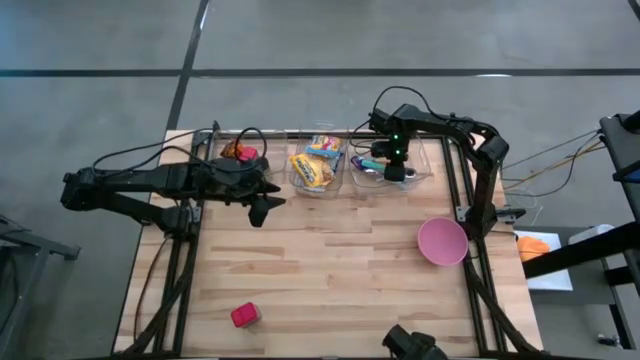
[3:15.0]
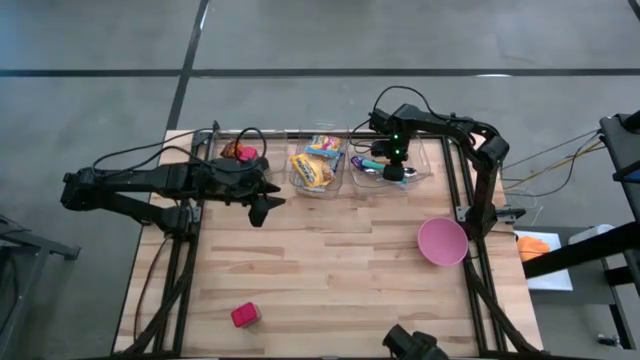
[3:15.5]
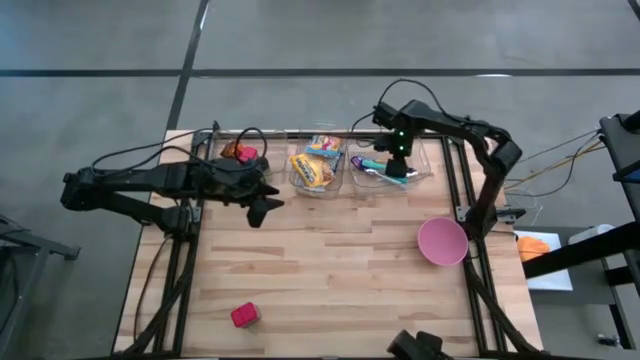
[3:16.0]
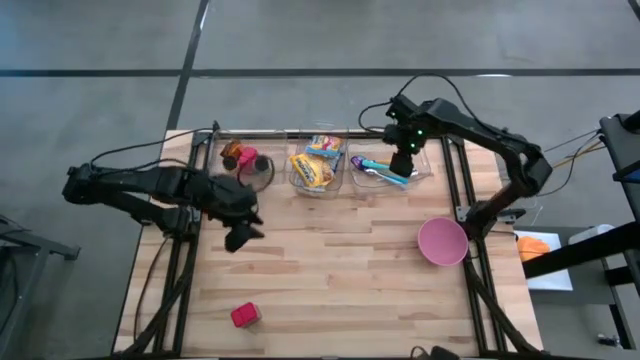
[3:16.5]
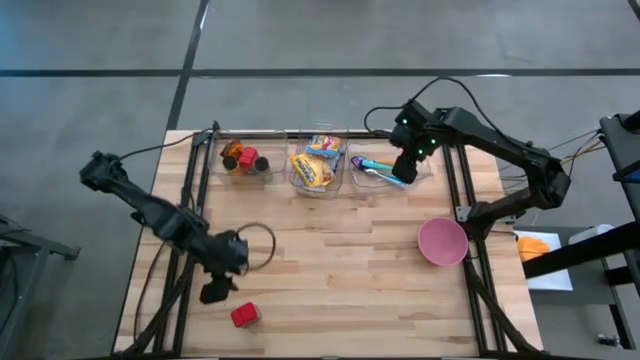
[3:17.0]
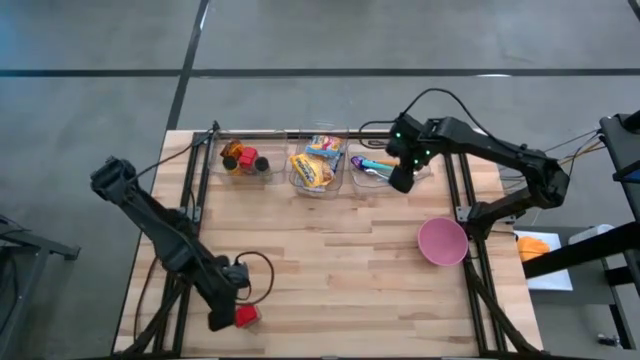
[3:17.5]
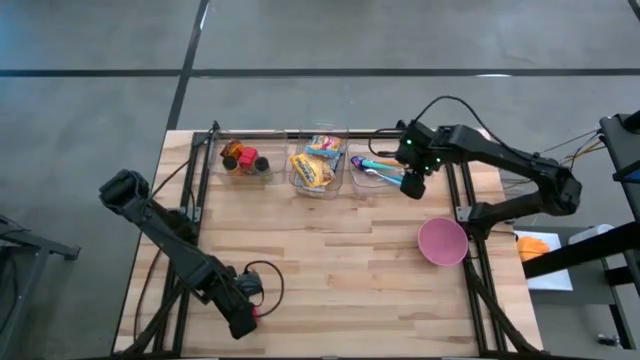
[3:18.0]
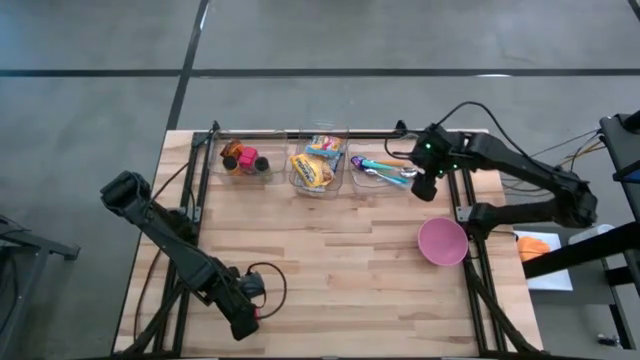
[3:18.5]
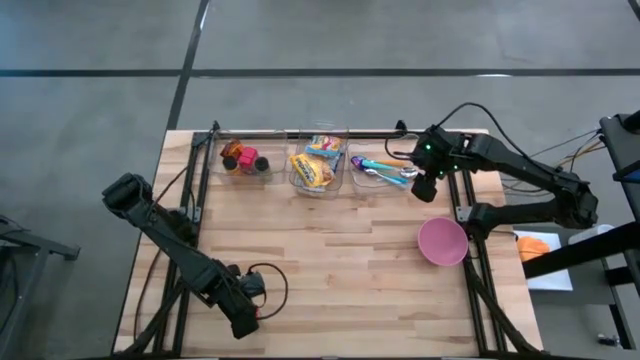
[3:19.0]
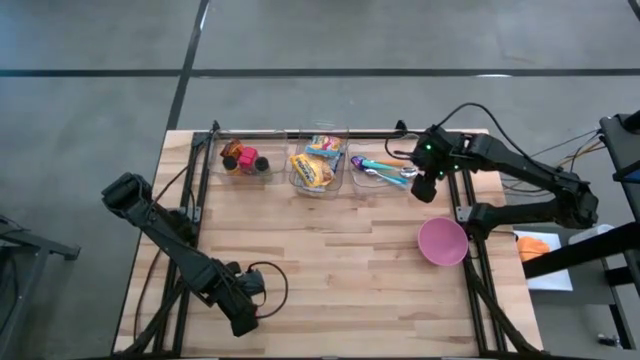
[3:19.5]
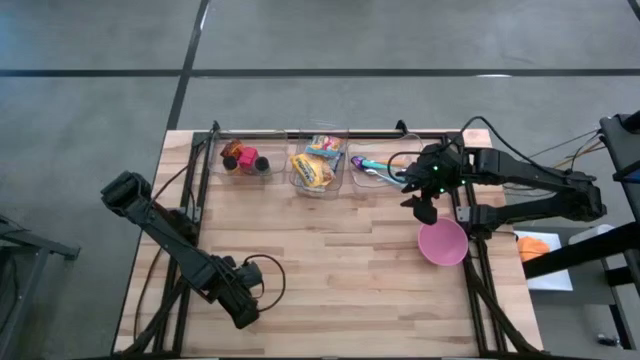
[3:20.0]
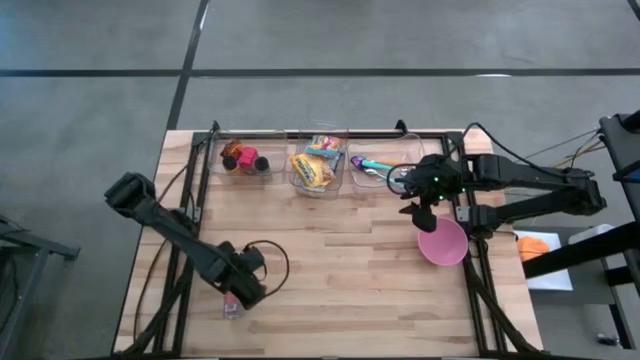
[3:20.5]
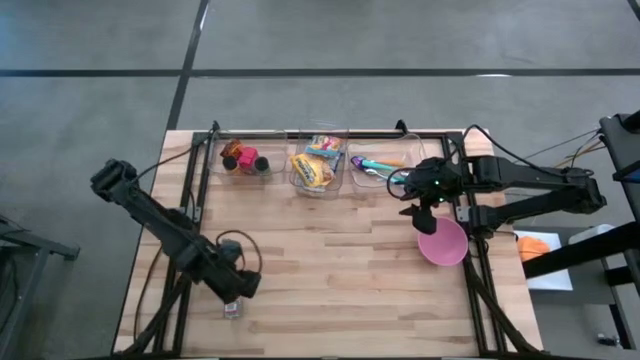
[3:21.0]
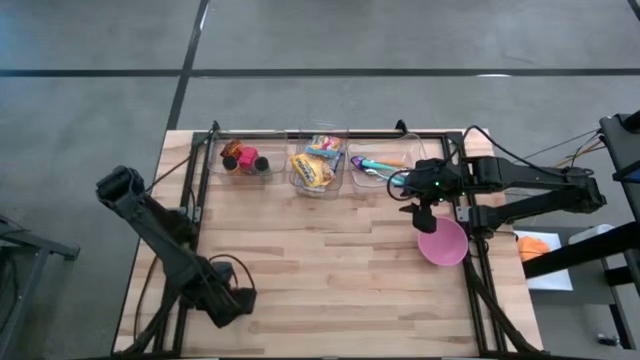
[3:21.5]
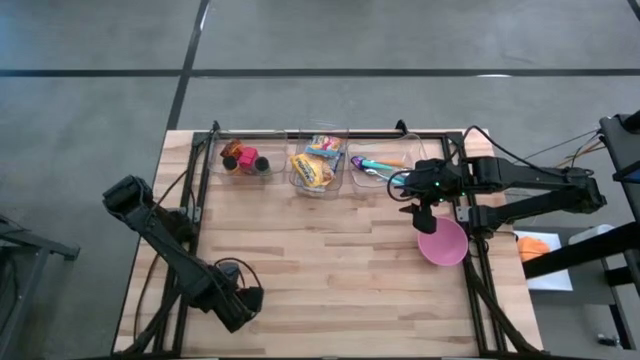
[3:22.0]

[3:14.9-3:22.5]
Put the red seasoning can into the left transparent bin

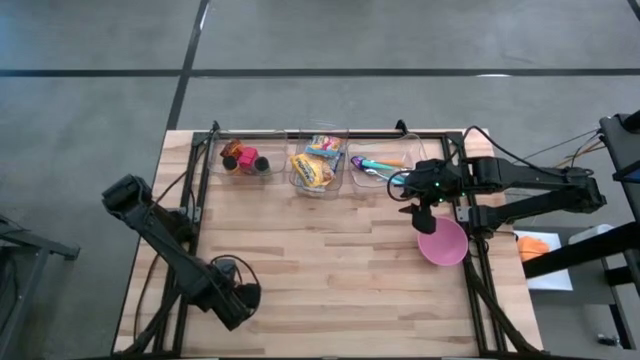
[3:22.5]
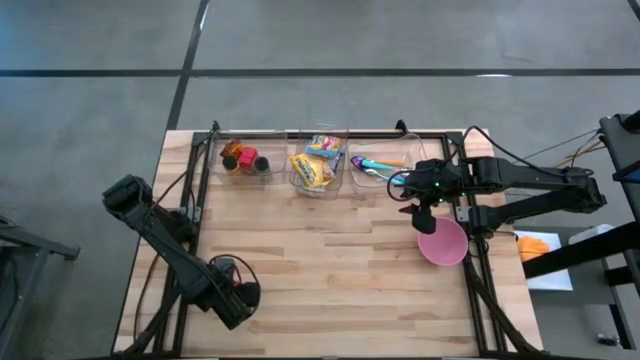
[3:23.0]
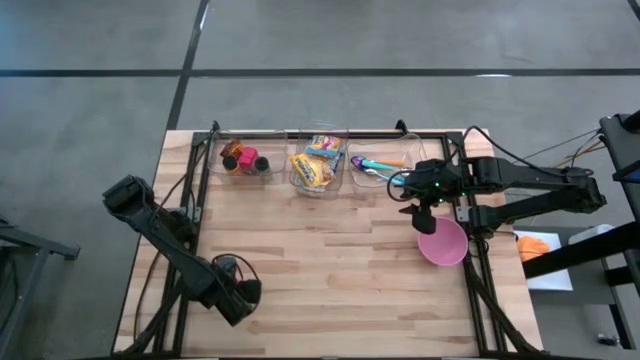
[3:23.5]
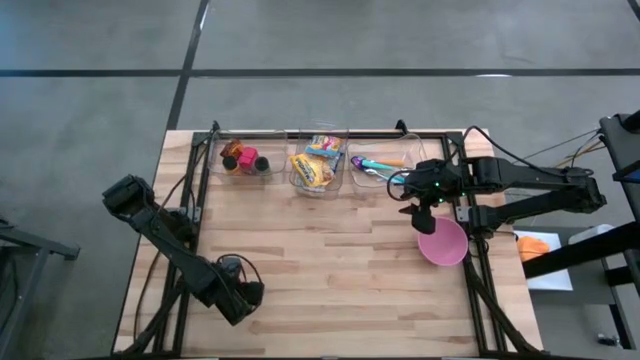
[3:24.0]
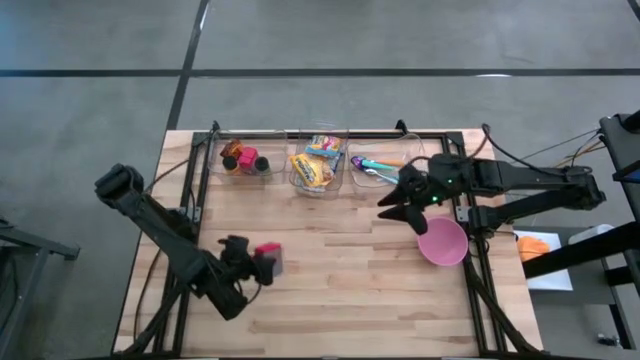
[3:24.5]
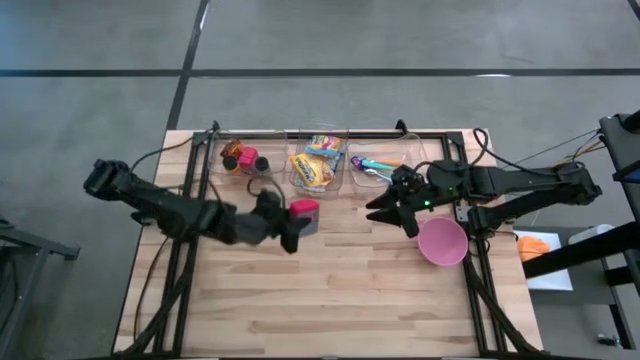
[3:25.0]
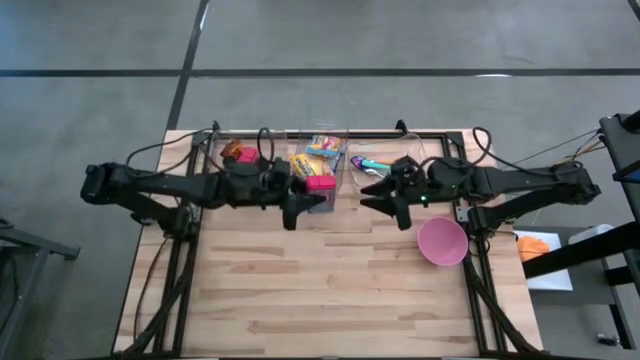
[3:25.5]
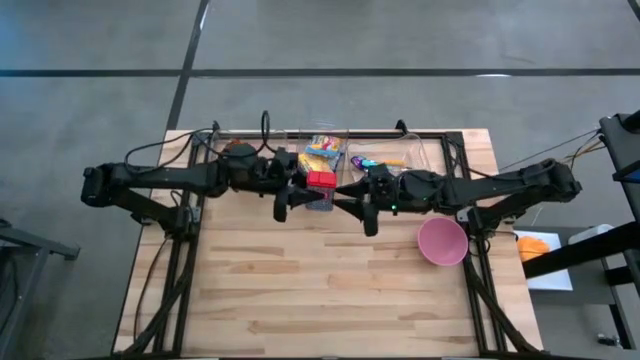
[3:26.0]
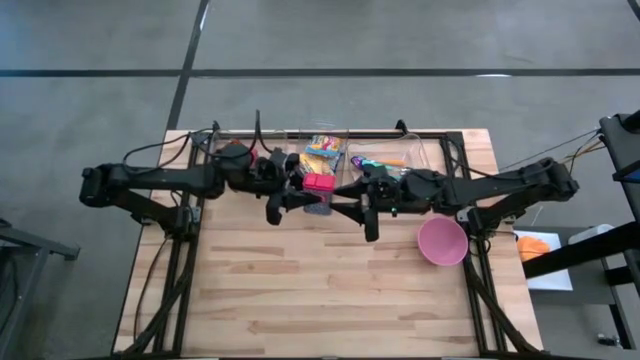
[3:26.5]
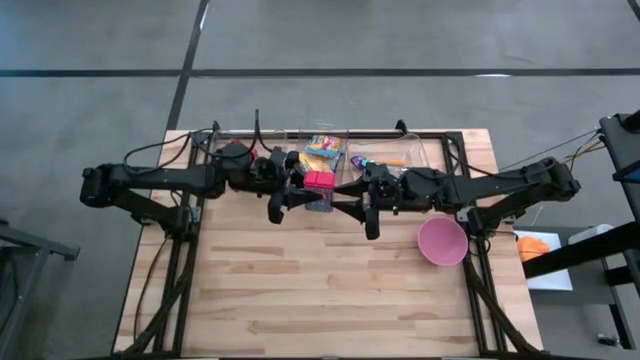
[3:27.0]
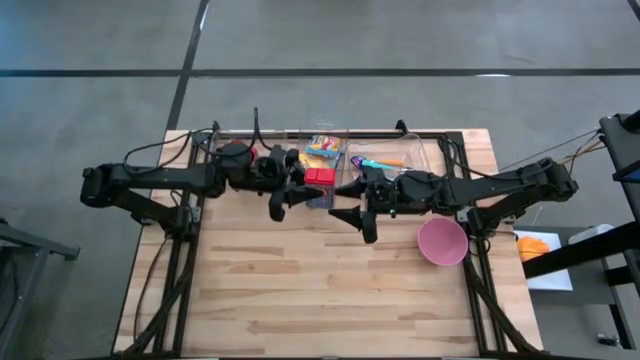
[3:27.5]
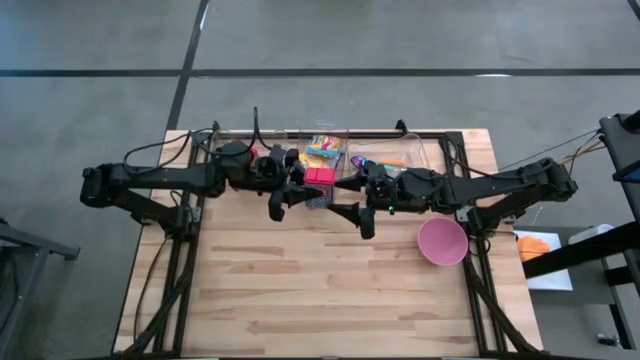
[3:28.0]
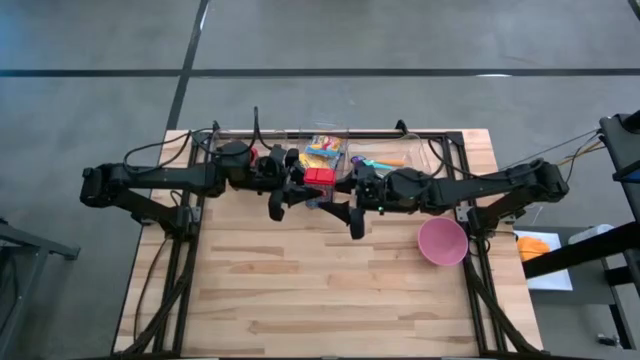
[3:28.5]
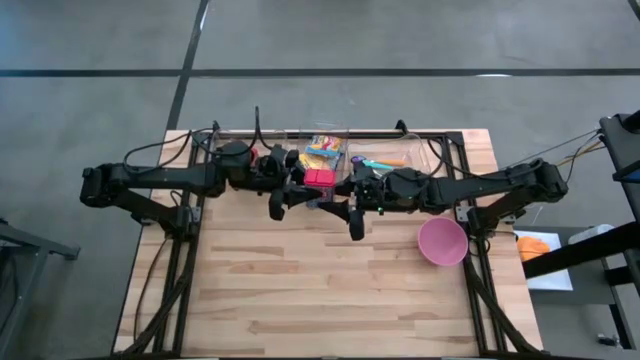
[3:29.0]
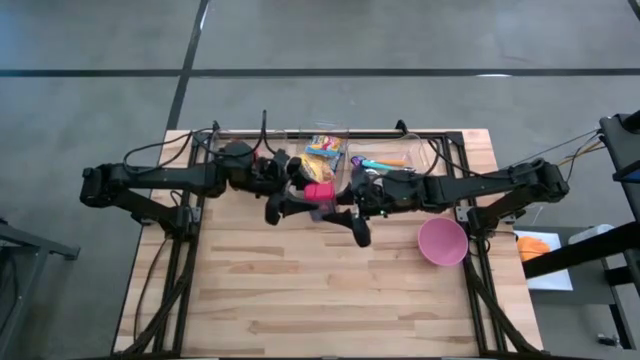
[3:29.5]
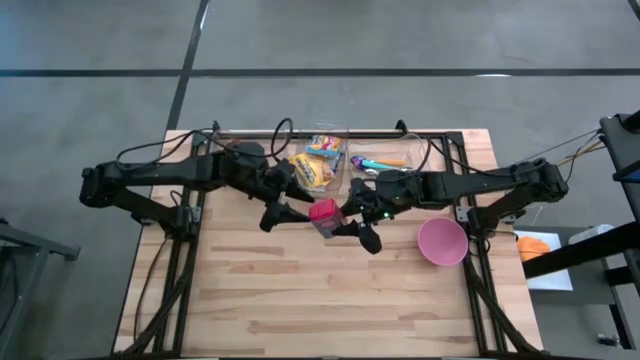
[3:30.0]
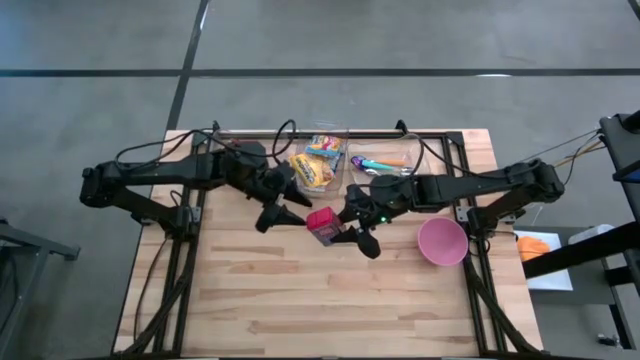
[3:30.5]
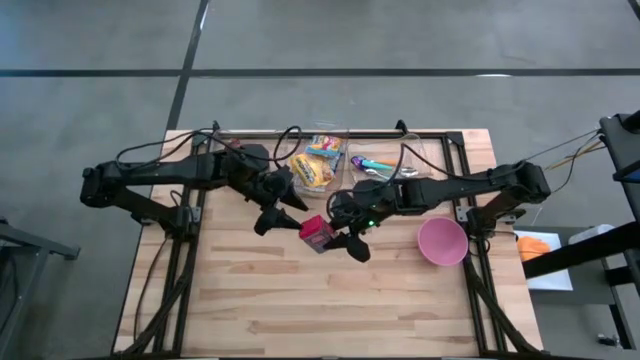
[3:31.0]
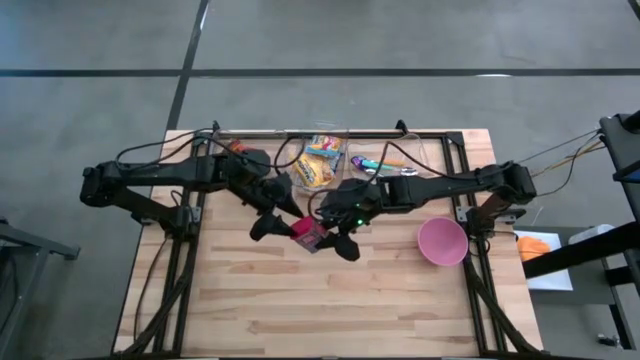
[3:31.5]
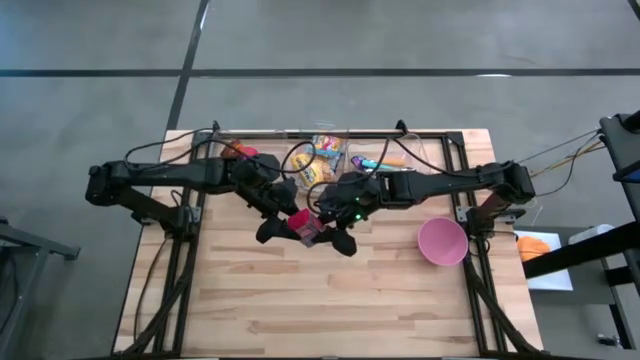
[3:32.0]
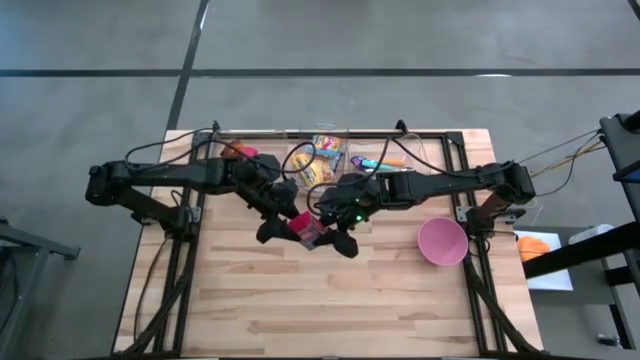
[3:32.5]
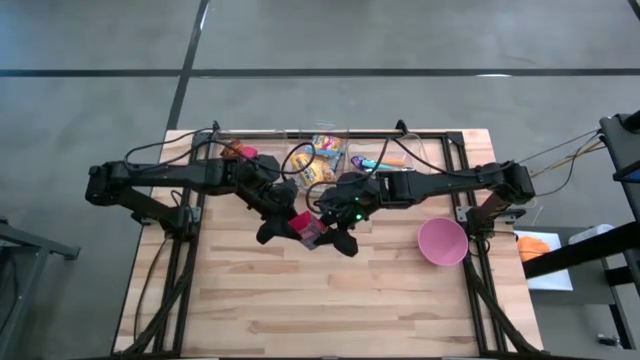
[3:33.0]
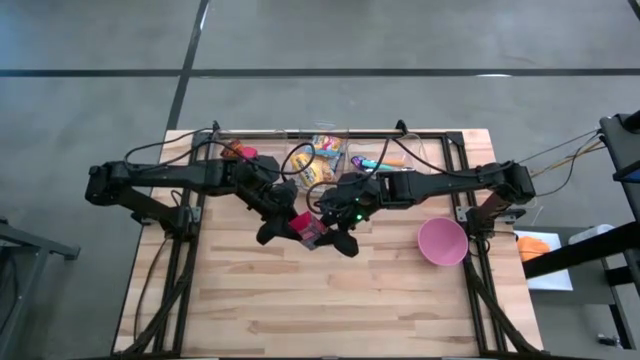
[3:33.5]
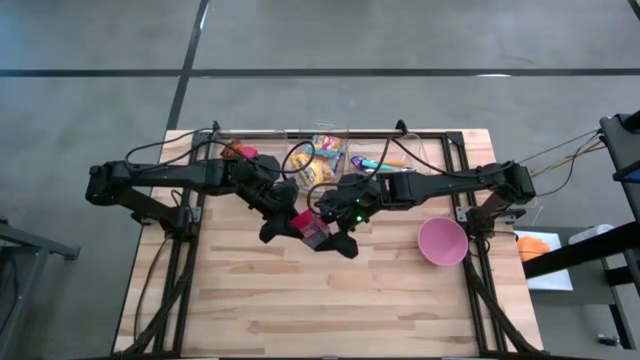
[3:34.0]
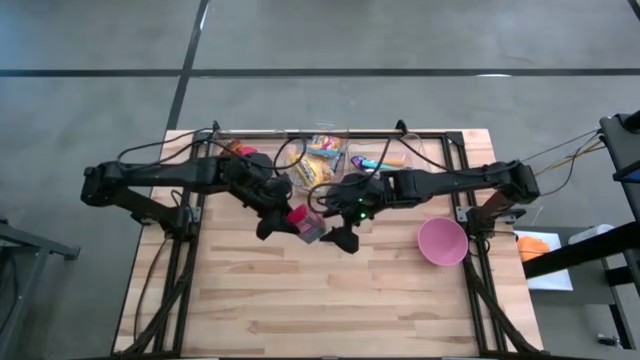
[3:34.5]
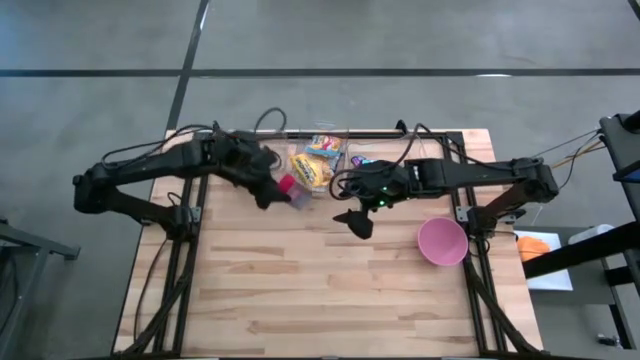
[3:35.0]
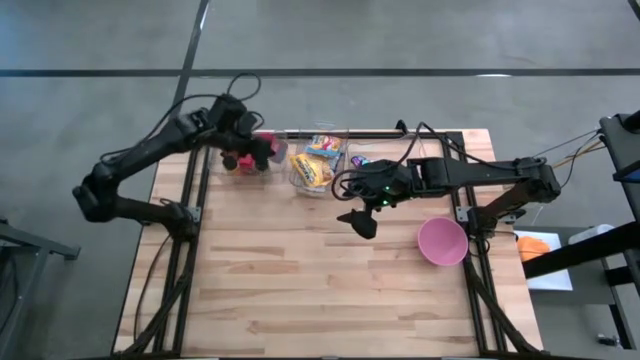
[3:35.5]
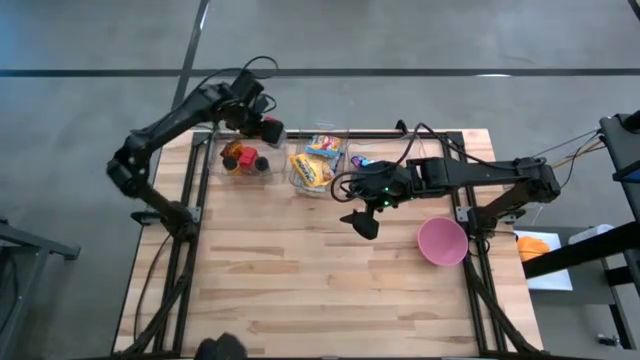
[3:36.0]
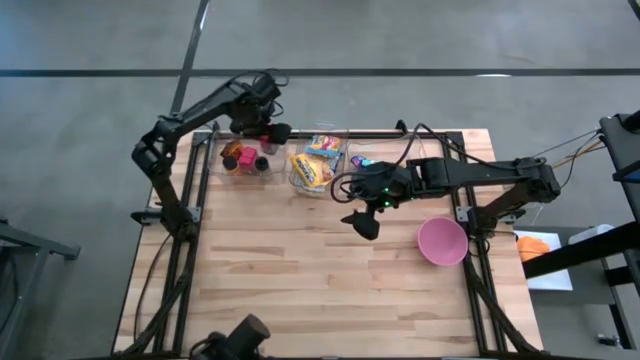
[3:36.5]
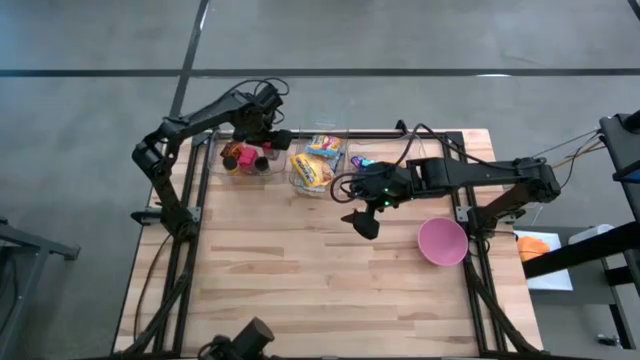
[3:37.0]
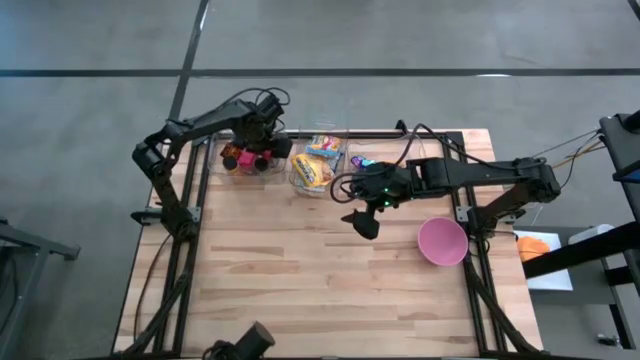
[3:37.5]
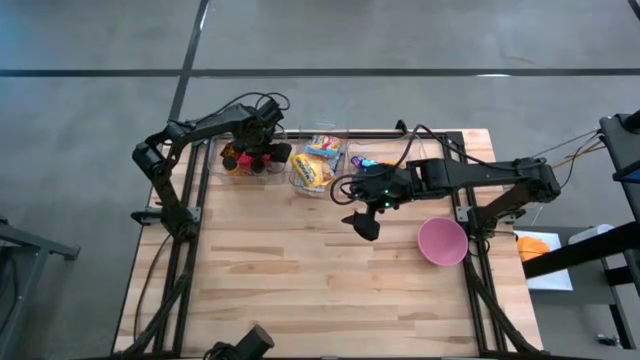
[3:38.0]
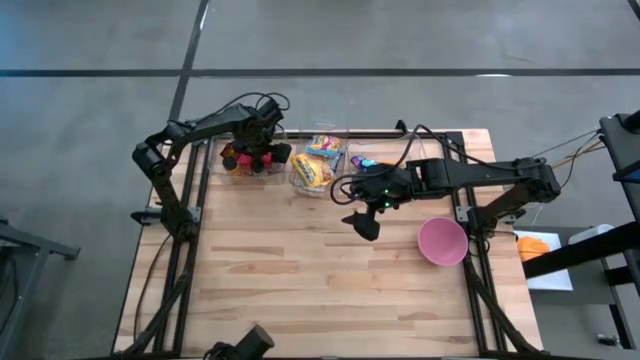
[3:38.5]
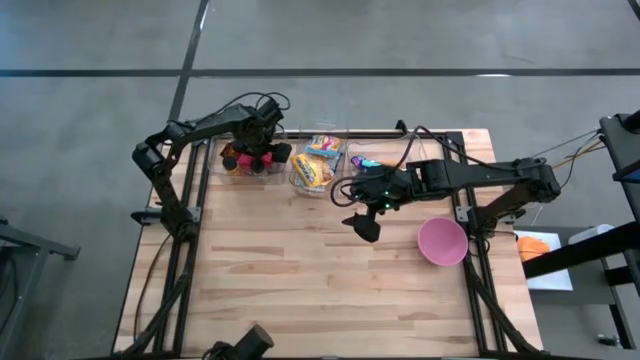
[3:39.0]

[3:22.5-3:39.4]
Put the red seasoning can into the left transparent bin
